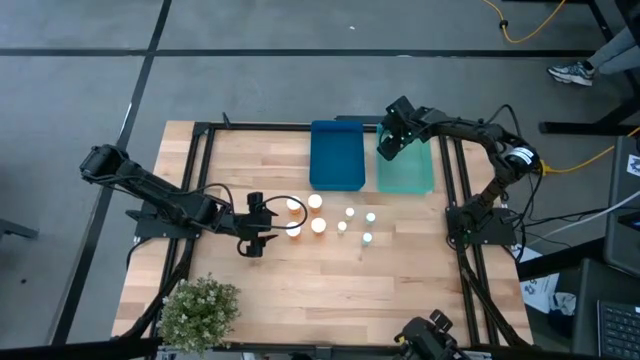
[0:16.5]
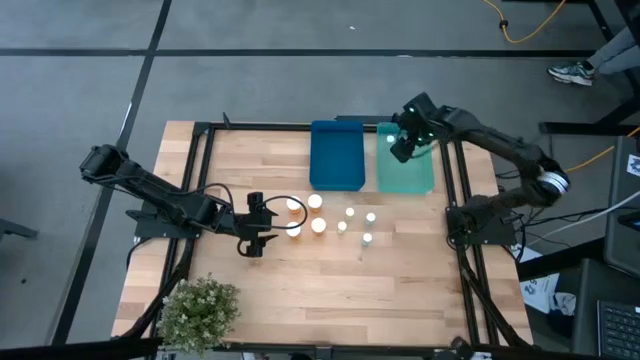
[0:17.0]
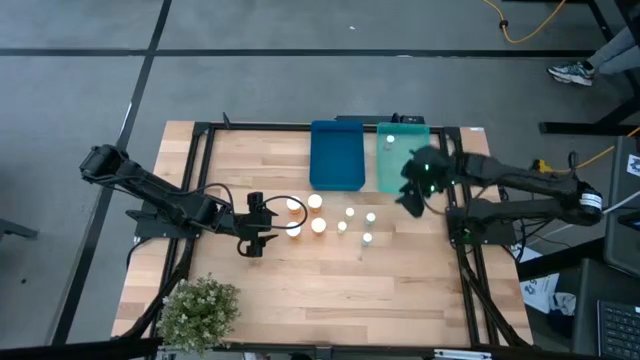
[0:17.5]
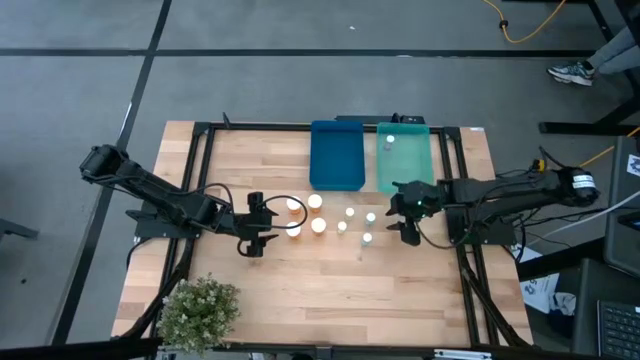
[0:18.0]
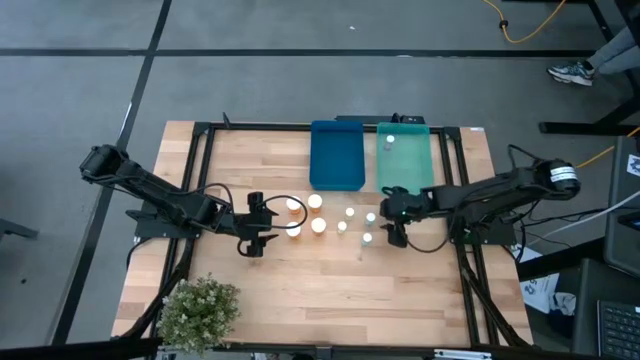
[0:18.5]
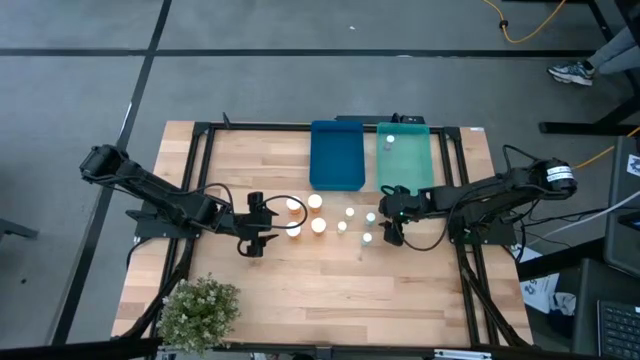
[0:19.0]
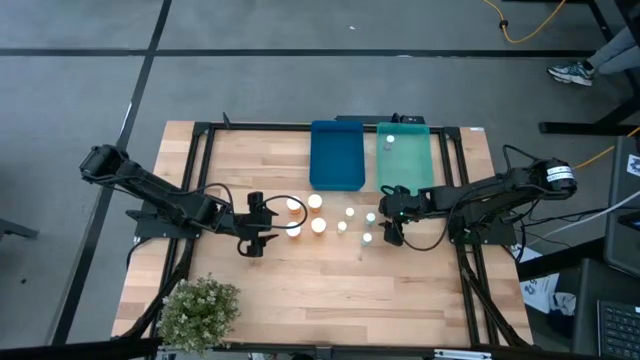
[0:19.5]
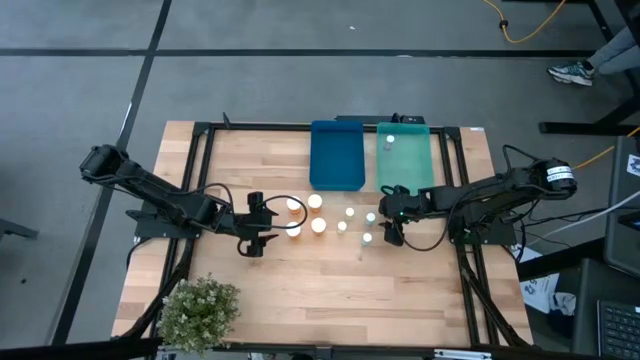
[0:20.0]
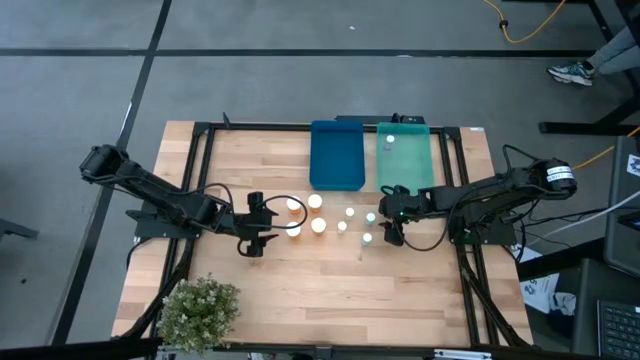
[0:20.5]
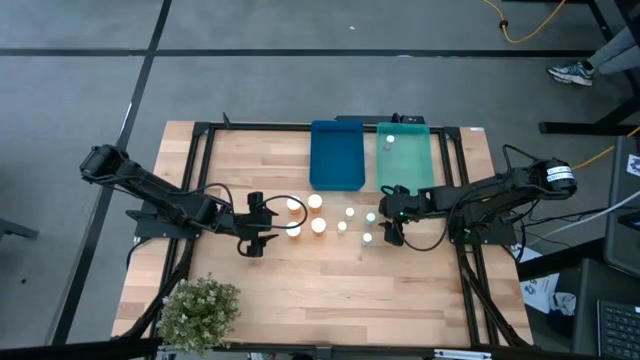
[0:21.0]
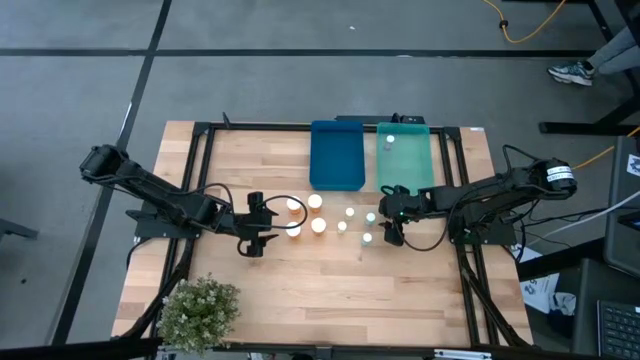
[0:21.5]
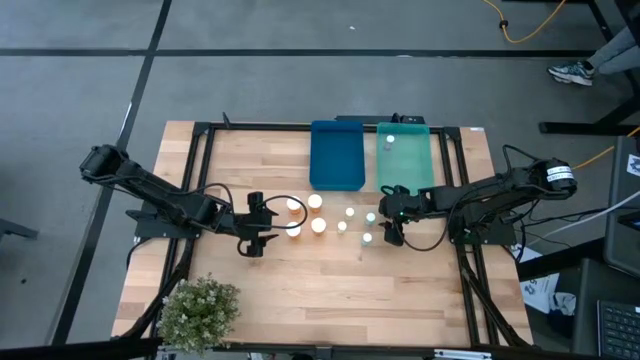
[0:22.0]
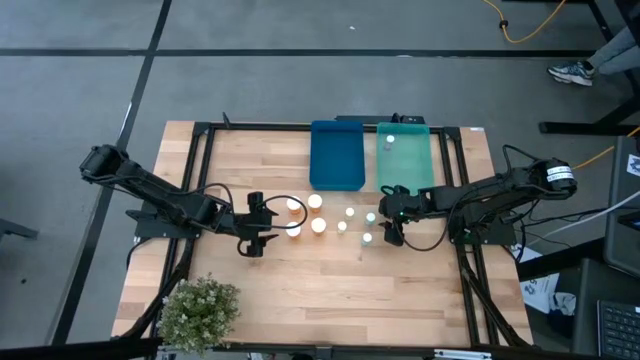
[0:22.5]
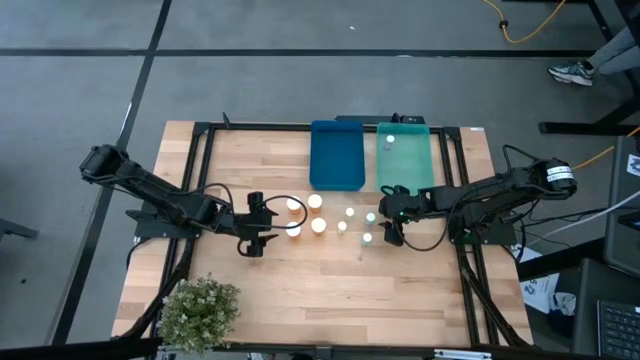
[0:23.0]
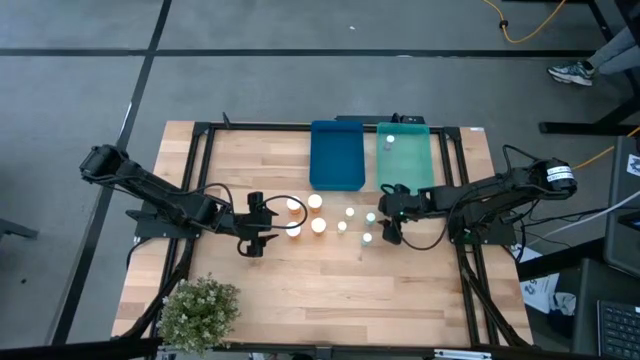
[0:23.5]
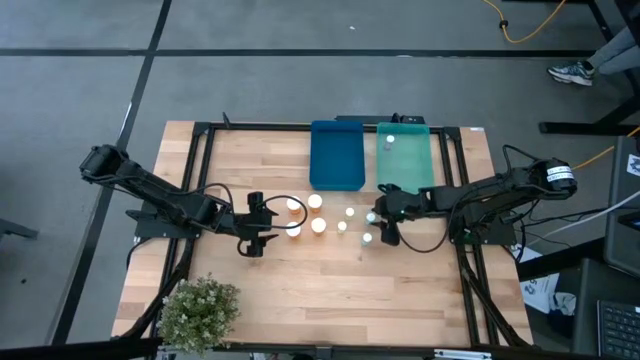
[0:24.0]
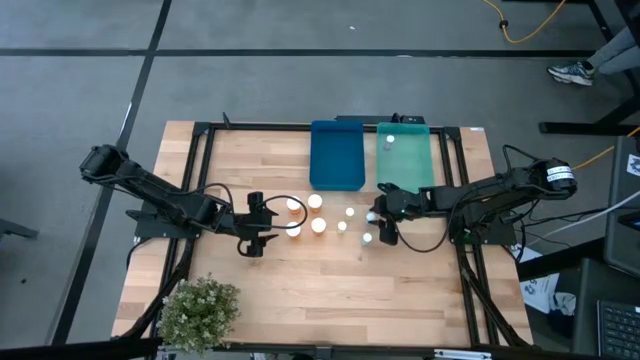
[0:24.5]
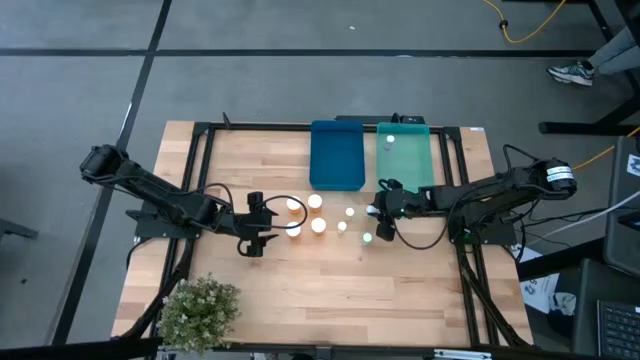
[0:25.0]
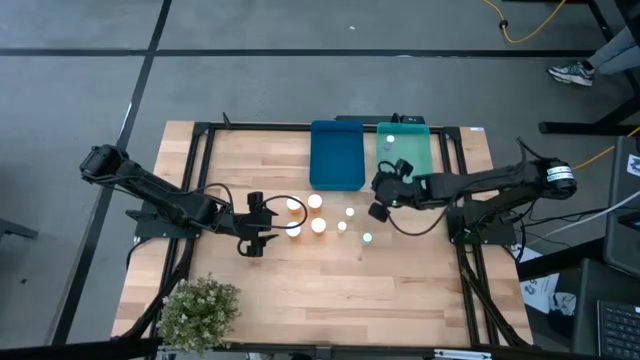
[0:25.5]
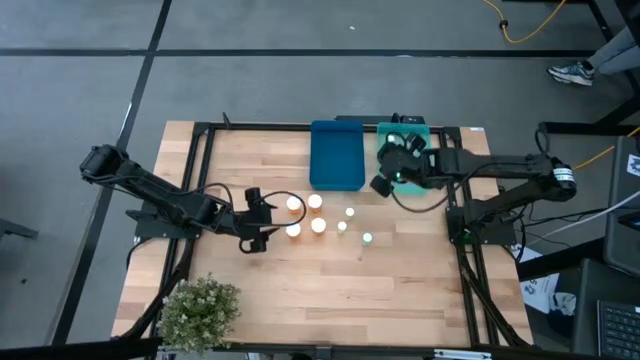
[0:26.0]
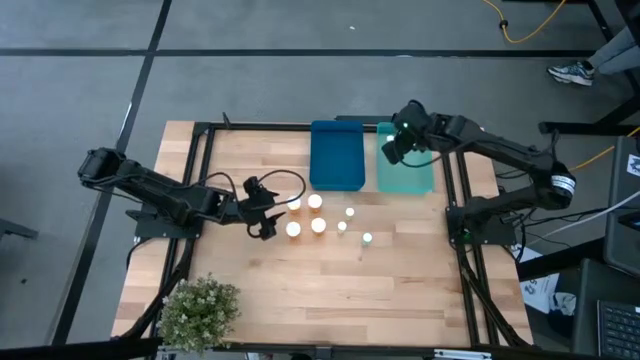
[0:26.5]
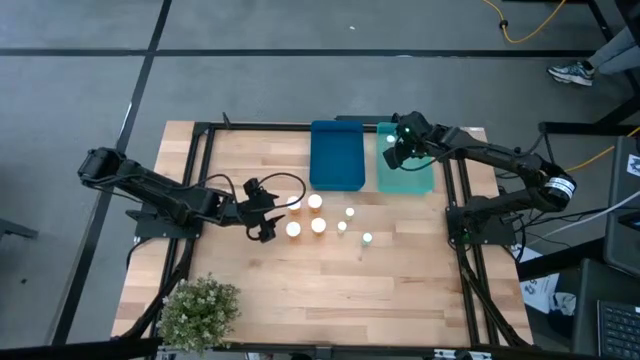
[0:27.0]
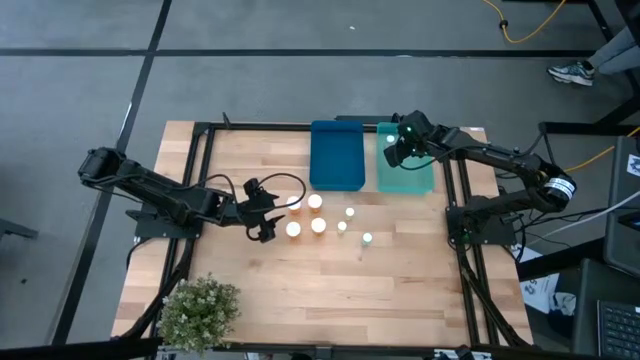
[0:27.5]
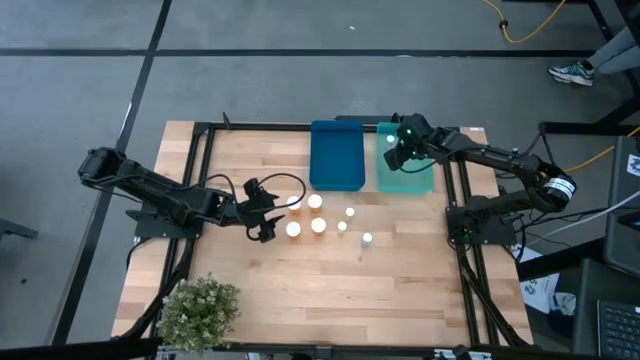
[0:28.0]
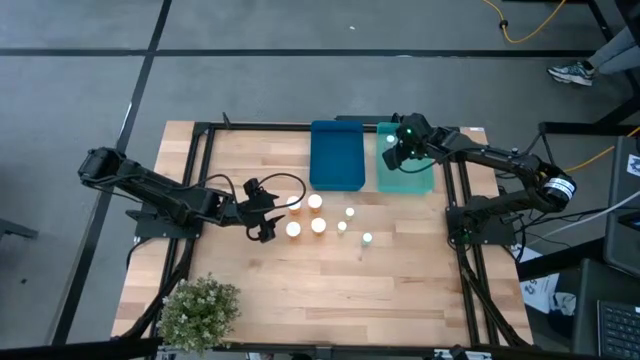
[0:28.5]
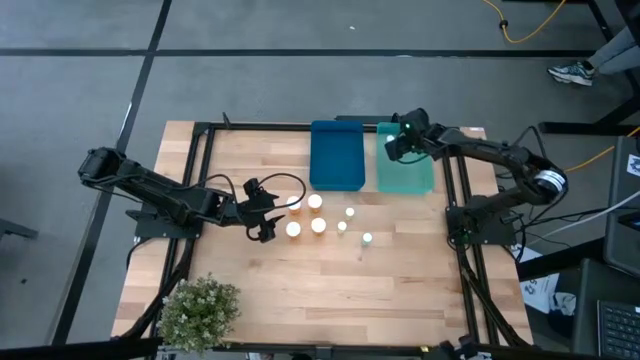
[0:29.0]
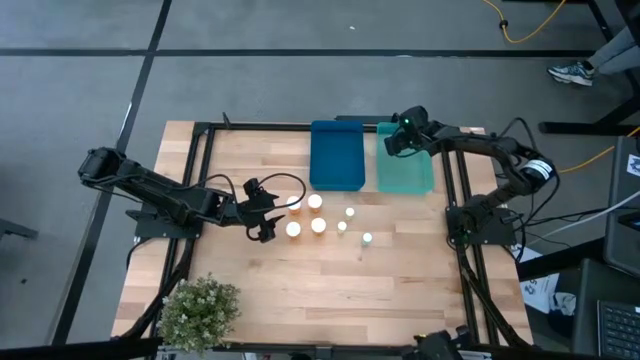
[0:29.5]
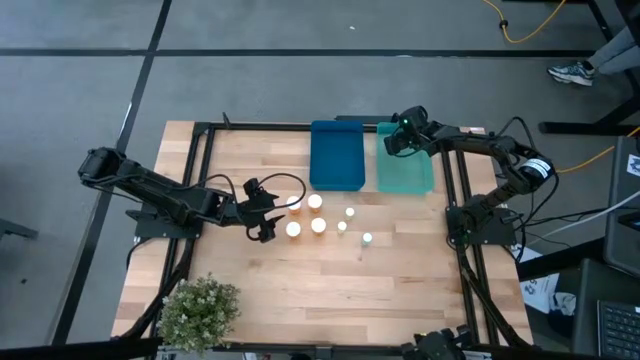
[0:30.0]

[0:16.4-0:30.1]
Task: Pick and place medicine bottles into bin by pill shape (circle, oval)
Put the blue pill bottle into the green transparent bin

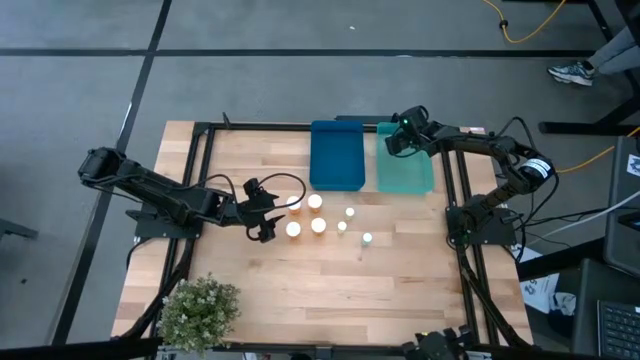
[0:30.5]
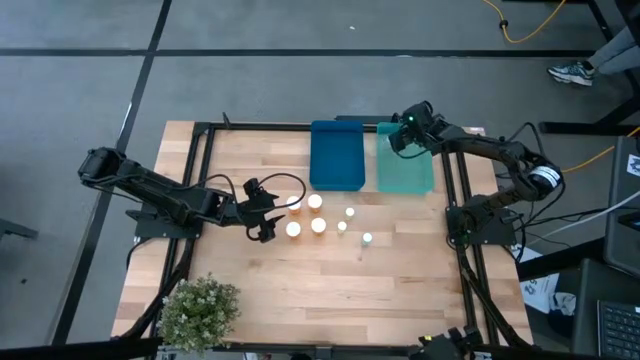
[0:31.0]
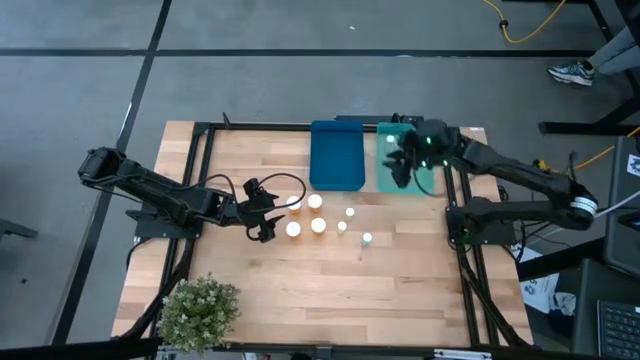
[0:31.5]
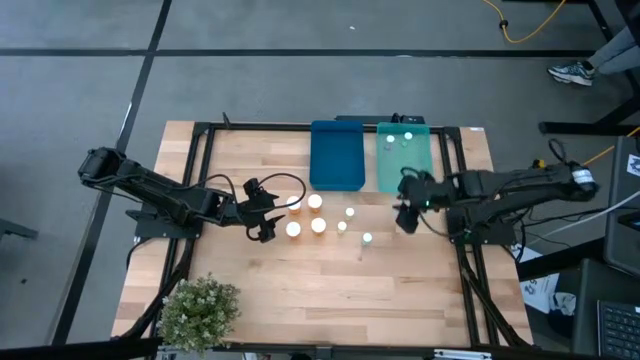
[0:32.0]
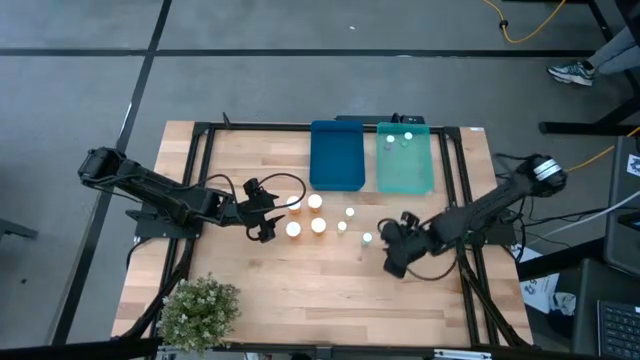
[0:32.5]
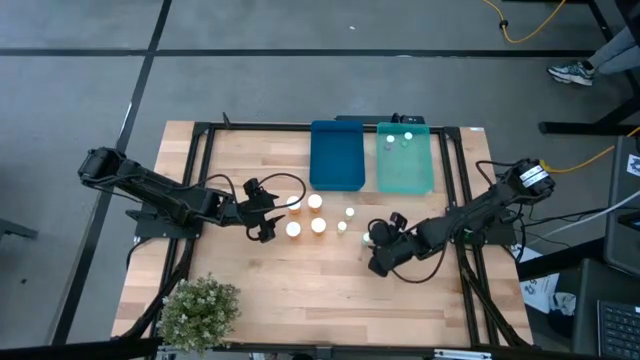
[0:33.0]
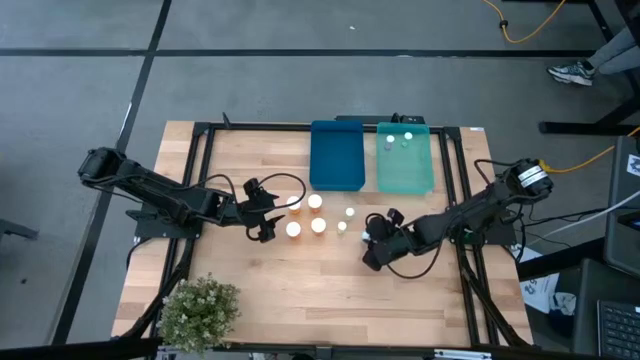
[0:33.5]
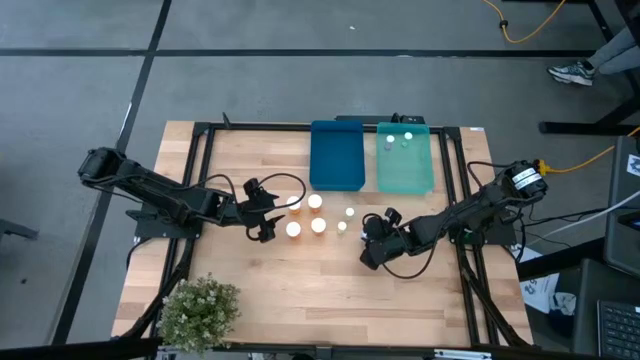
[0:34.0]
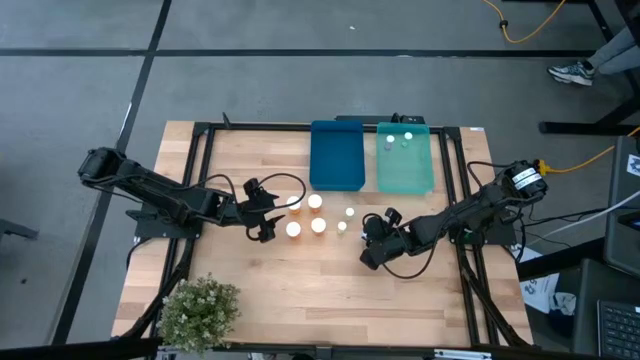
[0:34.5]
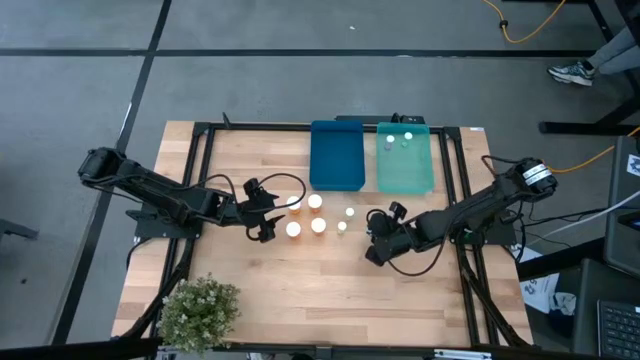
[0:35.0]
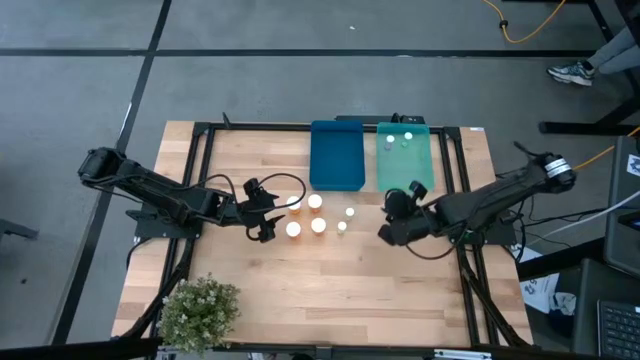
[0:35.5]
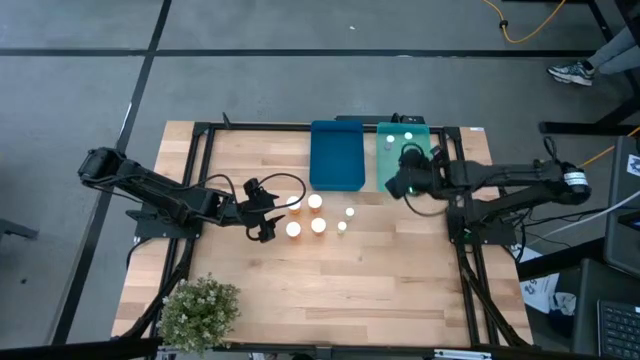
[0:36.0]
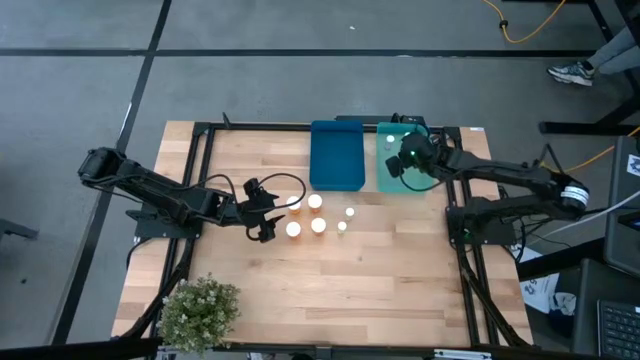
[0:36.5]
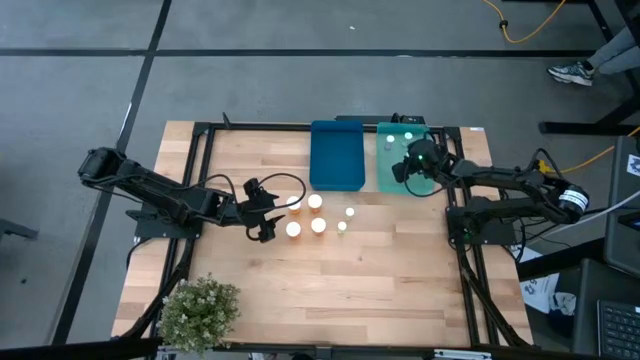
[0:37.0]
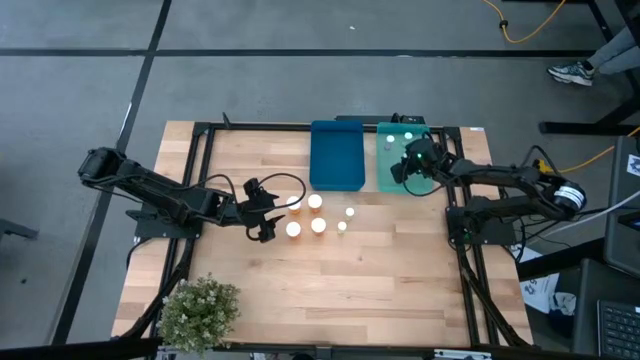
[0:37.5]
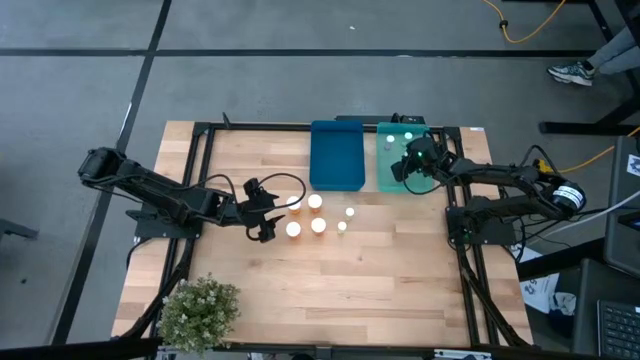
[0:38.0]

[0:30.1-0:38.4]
Put the blue pill bottle into the green transparent bin
